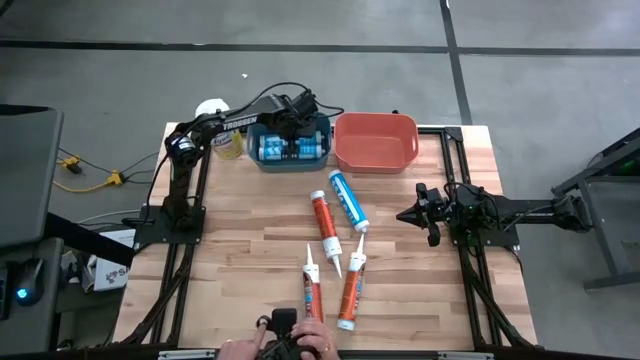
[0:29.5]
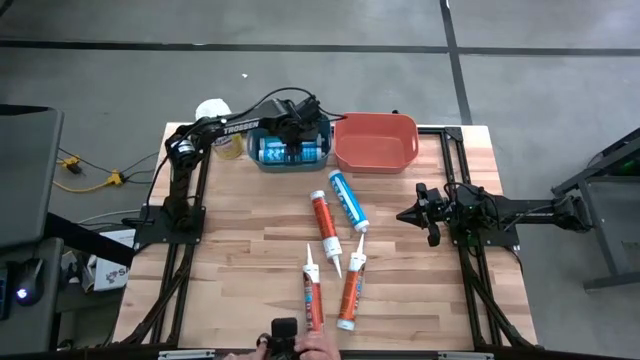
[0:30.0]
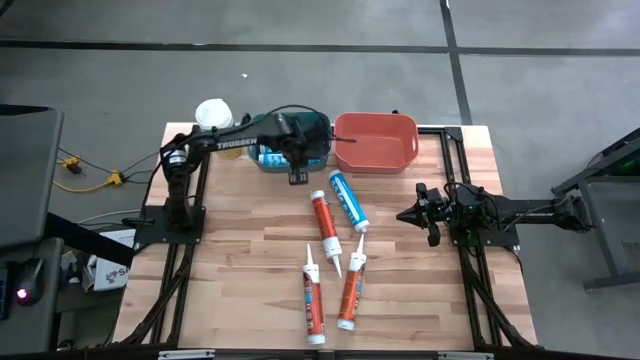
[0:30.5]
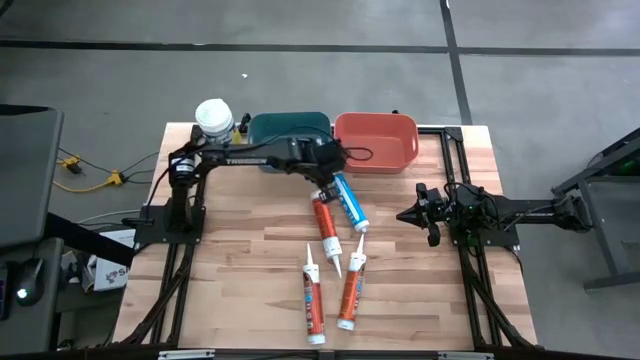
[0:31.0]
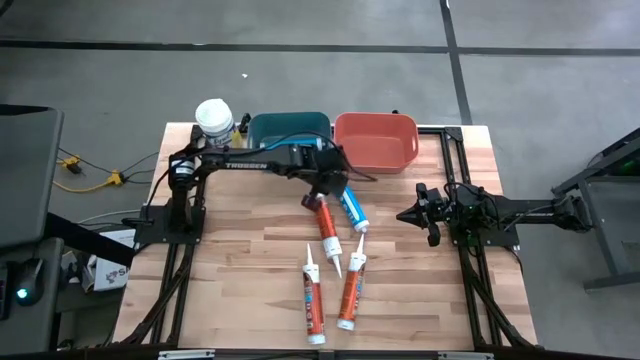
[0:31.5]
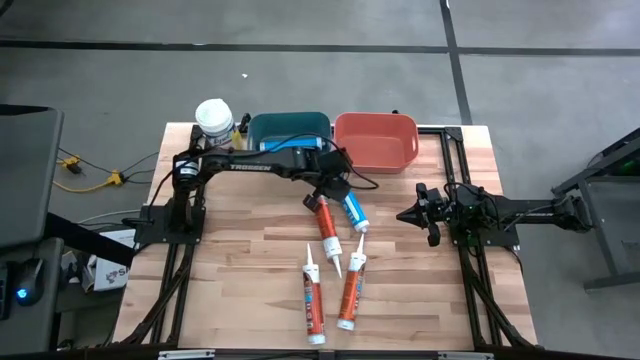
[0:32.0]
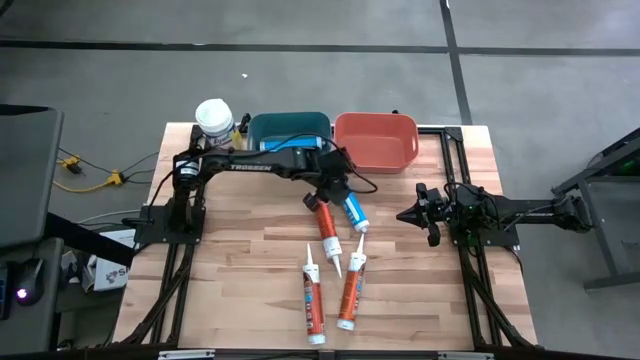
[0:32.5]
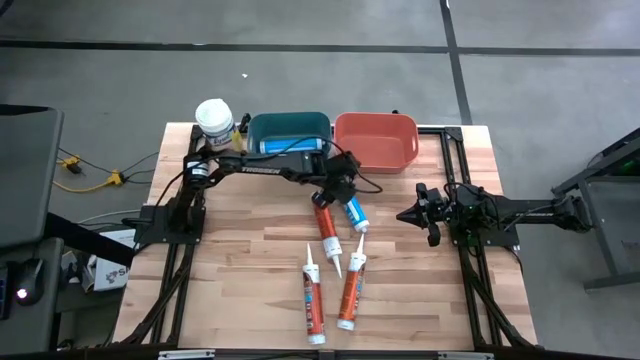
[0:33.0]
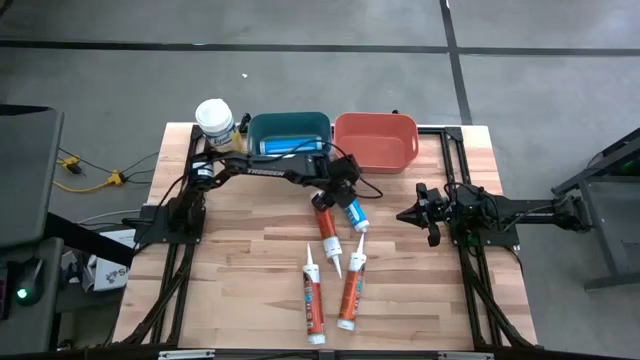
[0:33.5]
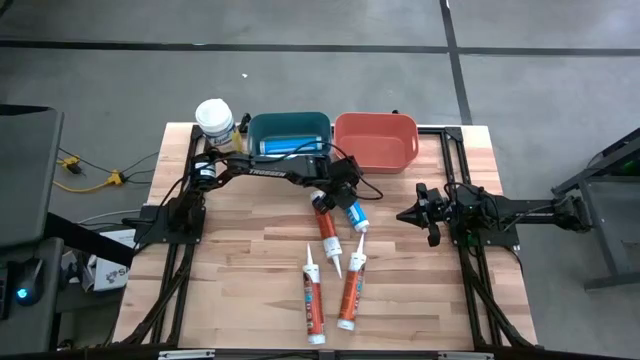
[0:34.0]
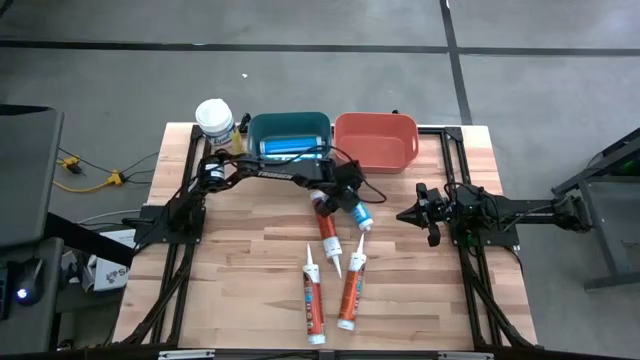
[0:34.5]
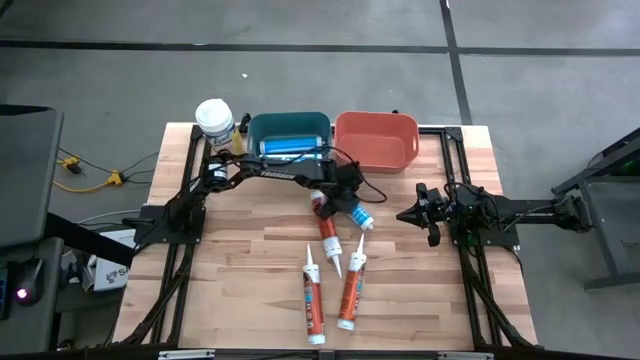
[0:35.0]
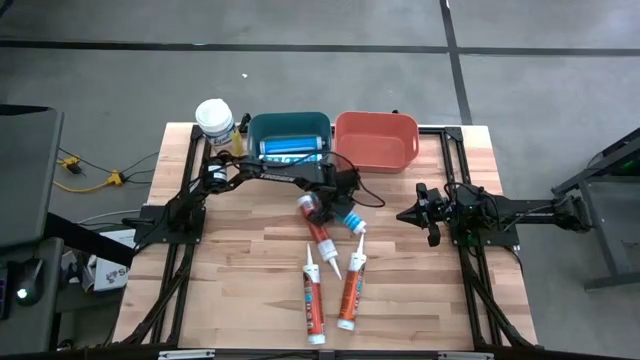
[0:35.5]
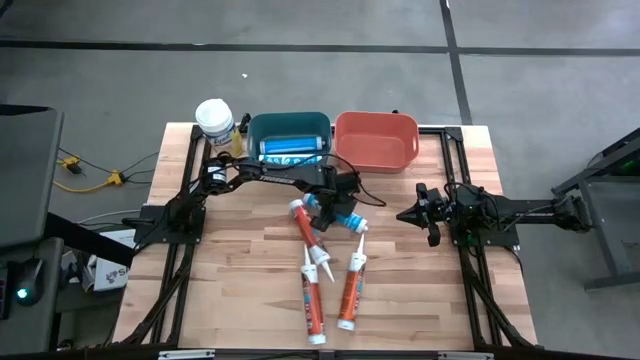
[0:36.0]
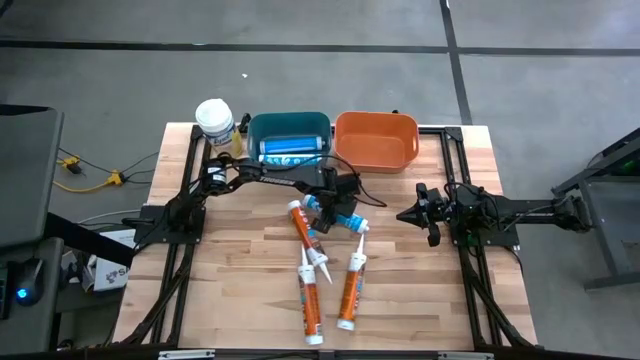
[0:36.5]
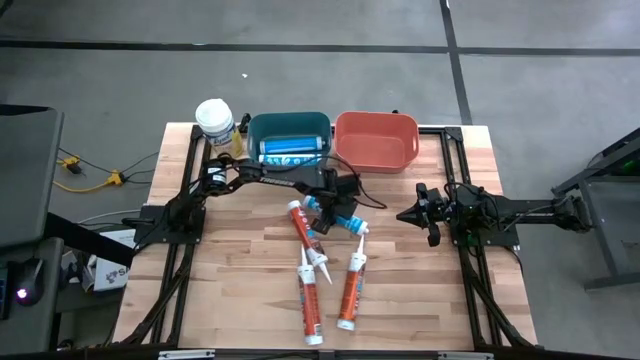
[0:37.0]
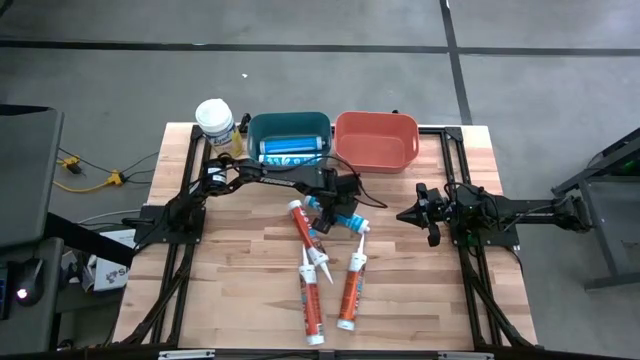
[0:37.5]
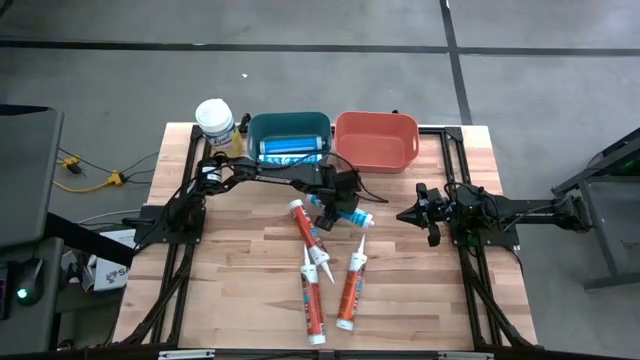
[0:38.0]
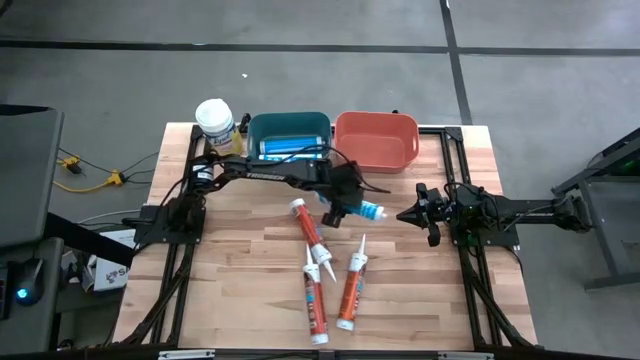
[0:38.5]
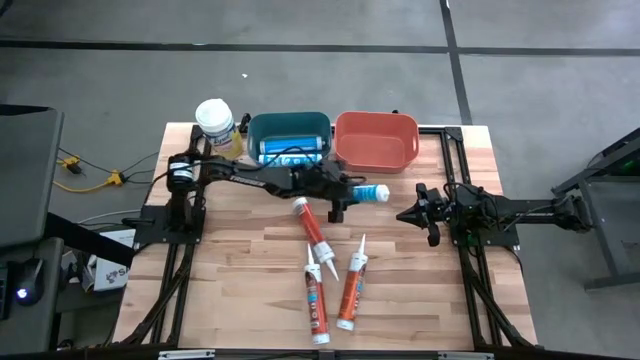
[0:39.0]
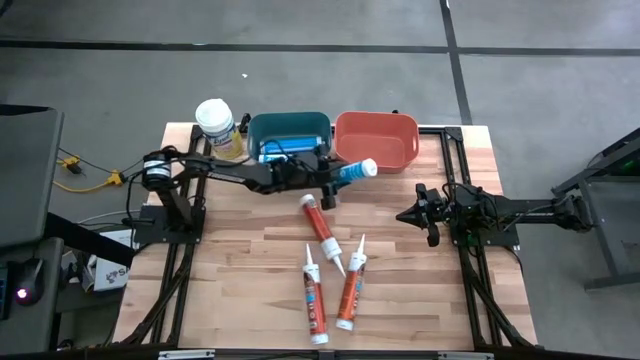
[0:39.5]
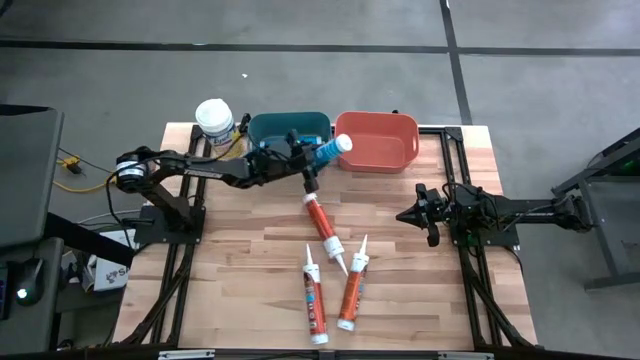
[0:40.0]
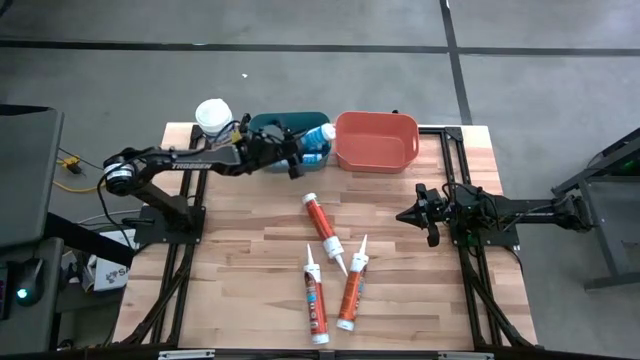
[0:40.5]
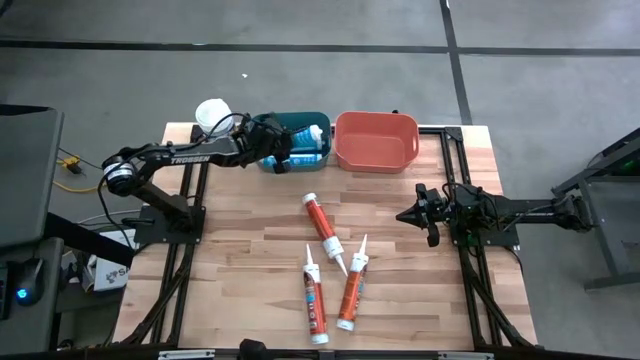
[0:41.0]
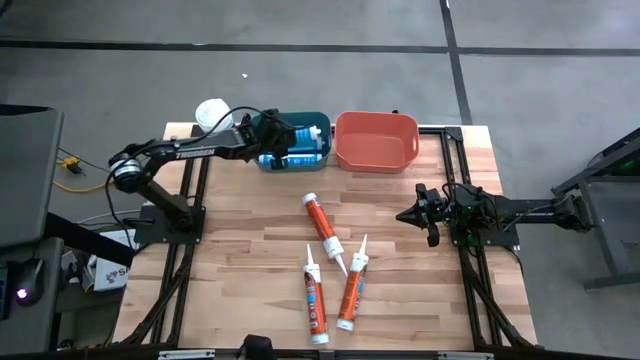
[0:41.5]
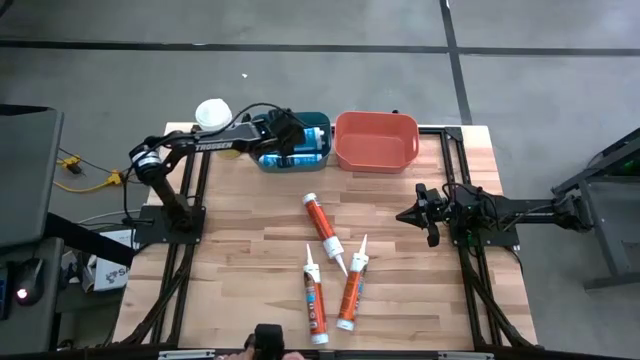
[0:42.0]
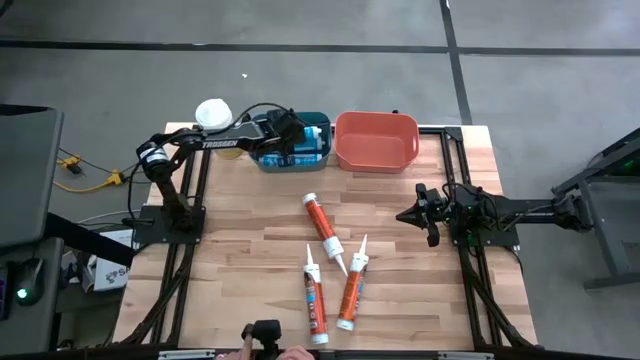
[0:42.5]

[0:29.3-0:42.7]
Task: Pick & place silicon tubes, Sealant and Lysol wipes
Put the blue sealant into the blue bin

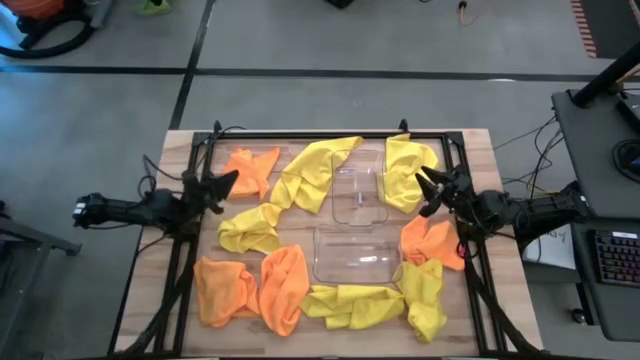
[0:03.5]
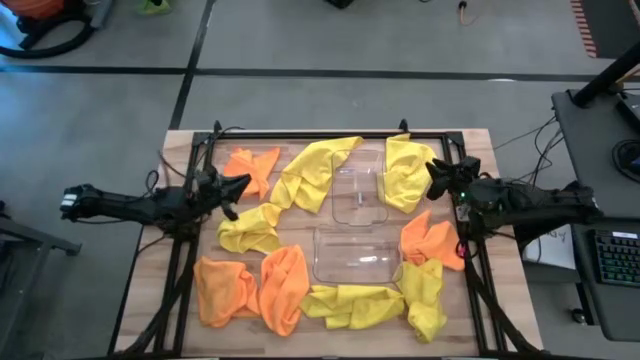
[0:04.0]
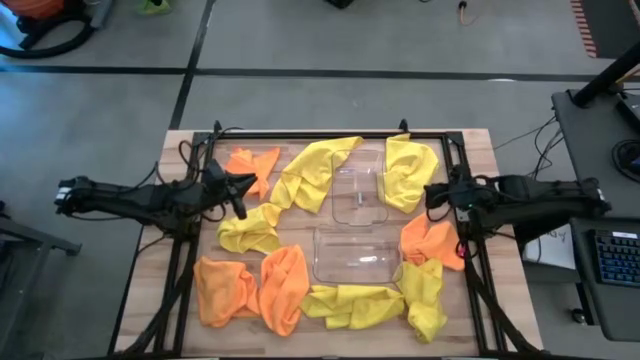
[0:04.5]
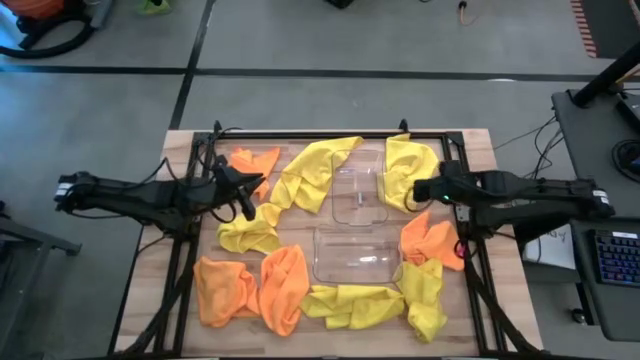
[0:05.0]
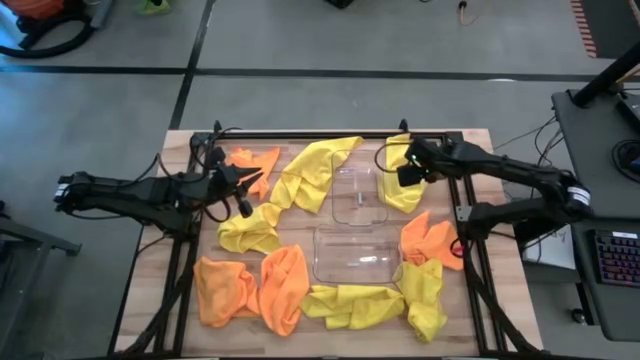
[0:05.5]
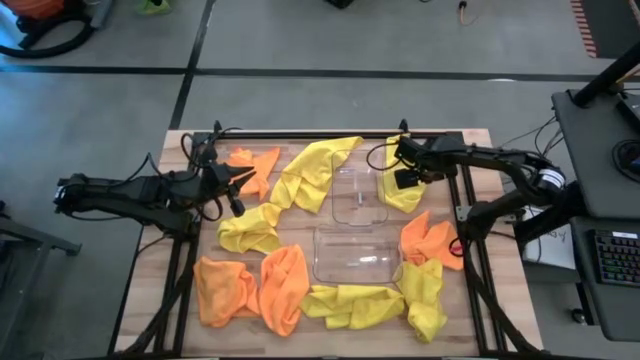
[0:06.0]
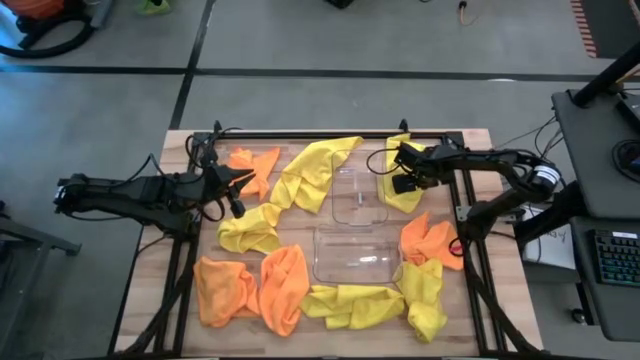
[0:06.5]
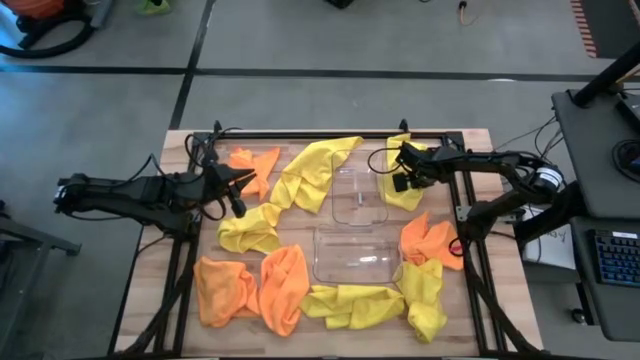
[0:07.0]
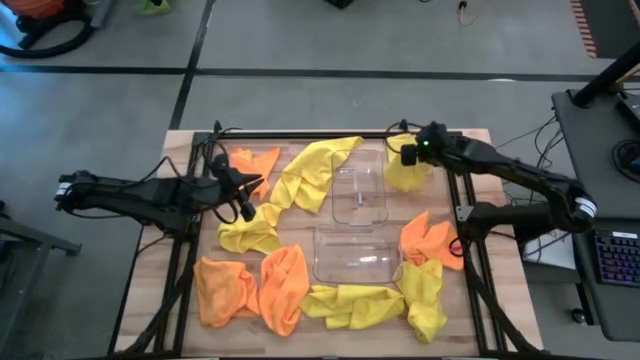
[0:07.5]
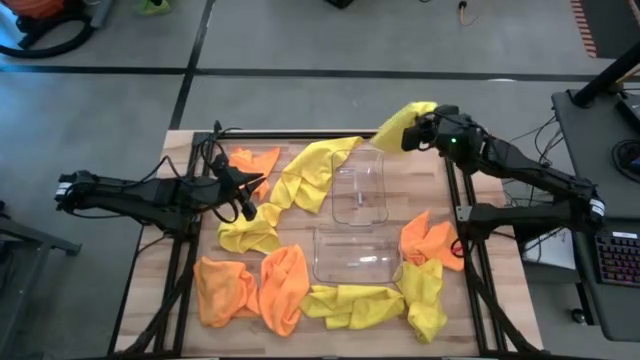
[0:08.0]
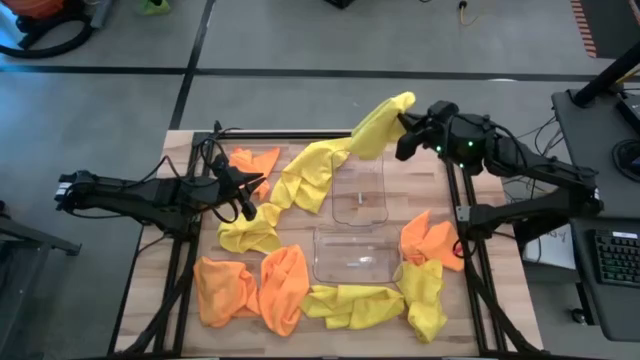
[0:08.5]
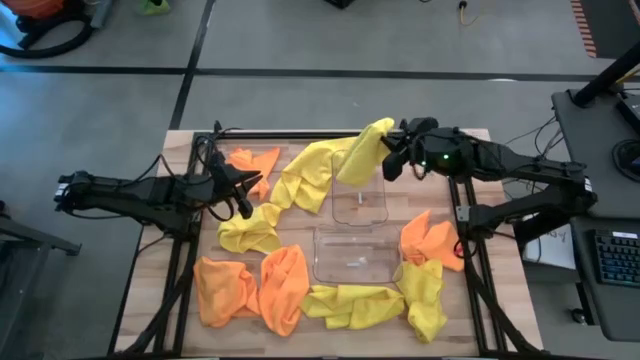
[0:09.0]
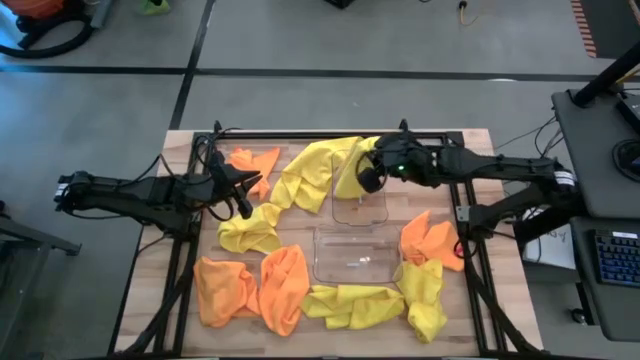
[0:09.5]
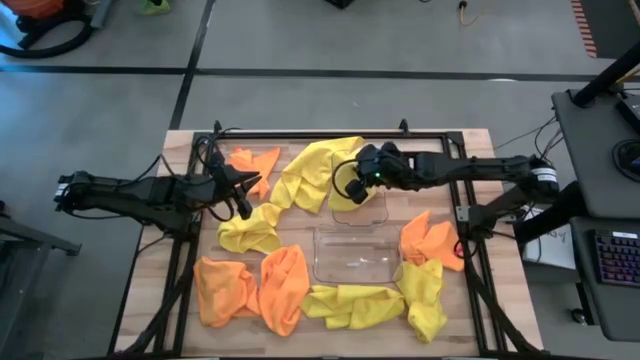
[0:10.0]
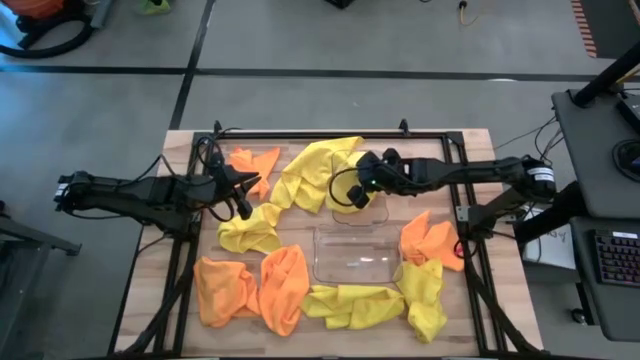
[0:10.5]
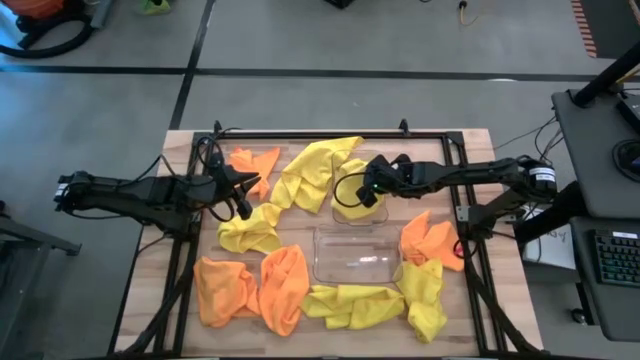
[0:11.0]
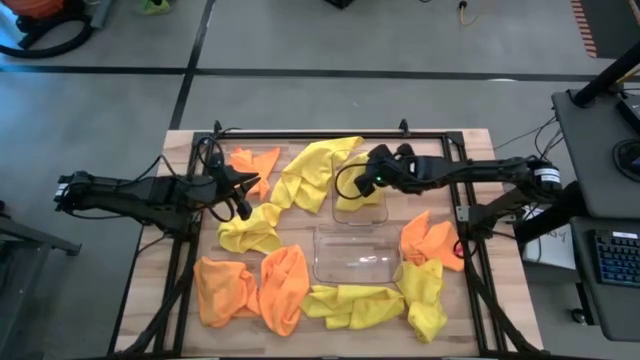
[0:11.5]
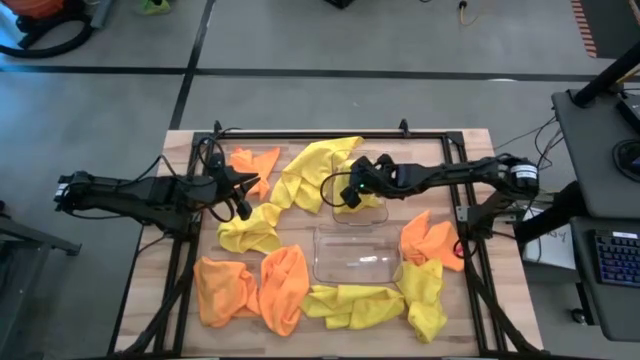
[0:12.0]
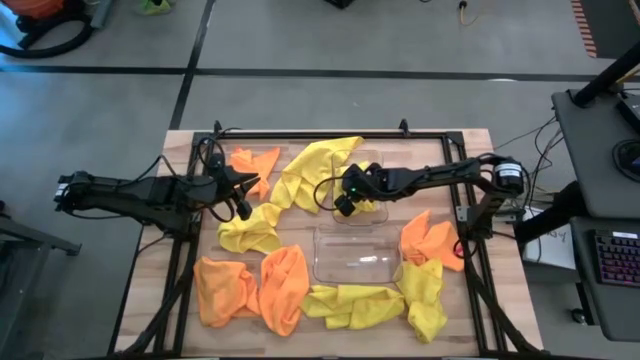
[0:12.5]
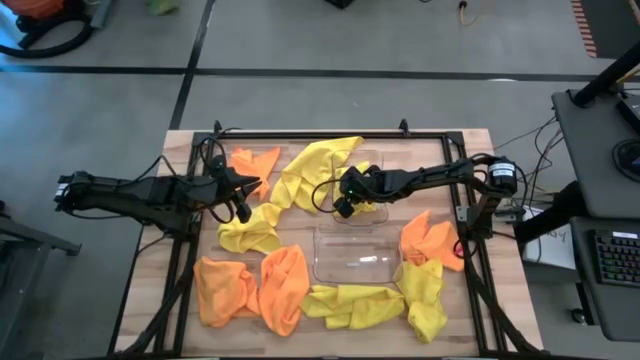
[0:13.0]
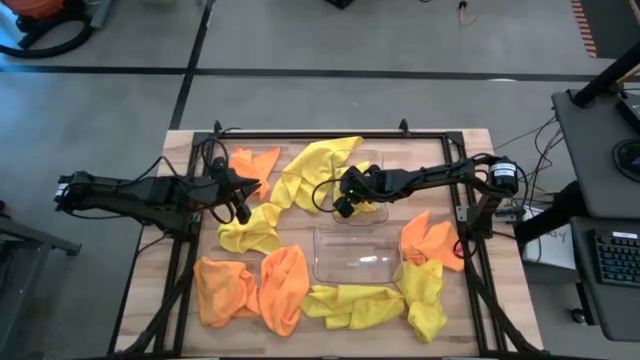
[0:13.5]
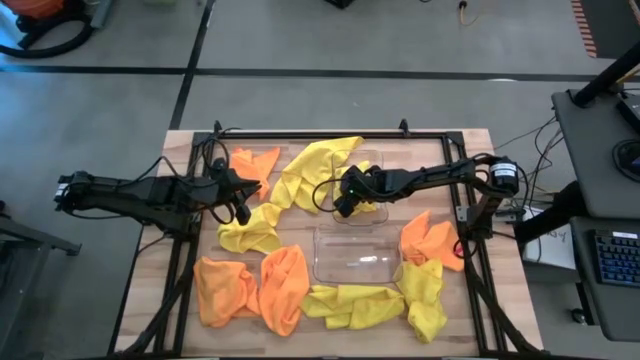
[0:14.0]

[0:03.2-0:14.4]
Task: Sort microfiber towel by color & place in baskets
Put the yellow towel into the top transparent bin
